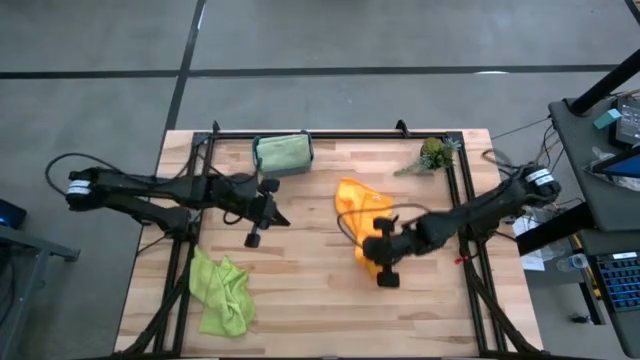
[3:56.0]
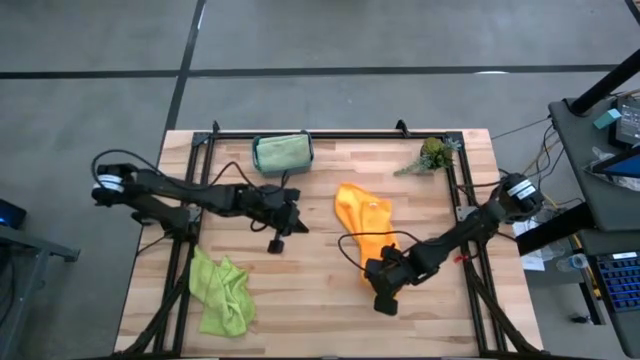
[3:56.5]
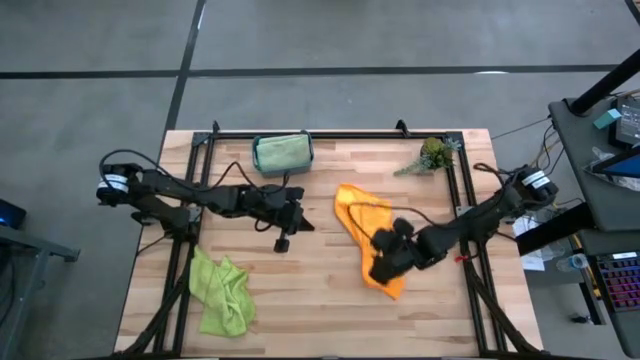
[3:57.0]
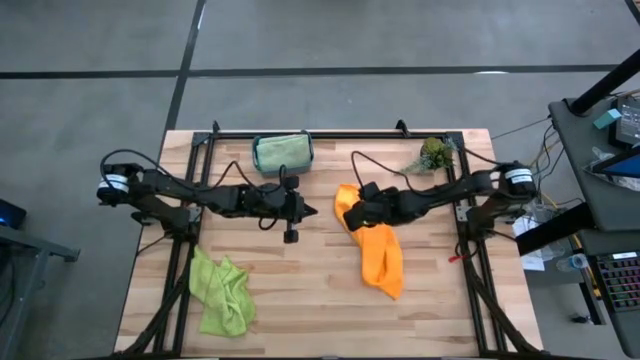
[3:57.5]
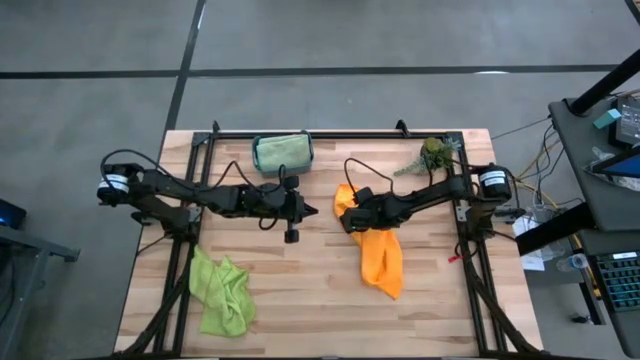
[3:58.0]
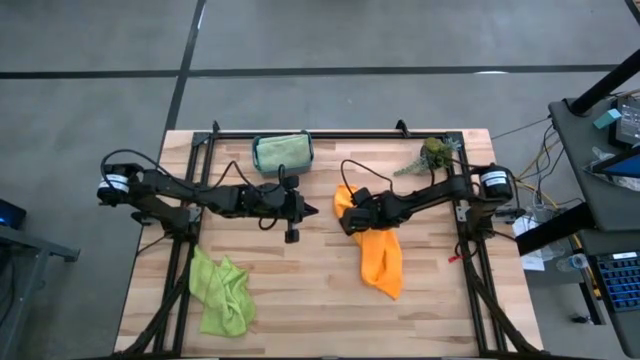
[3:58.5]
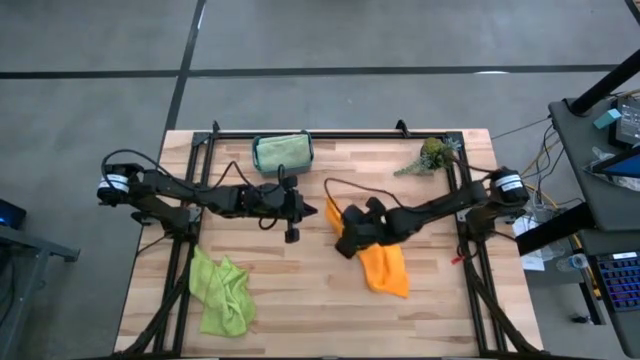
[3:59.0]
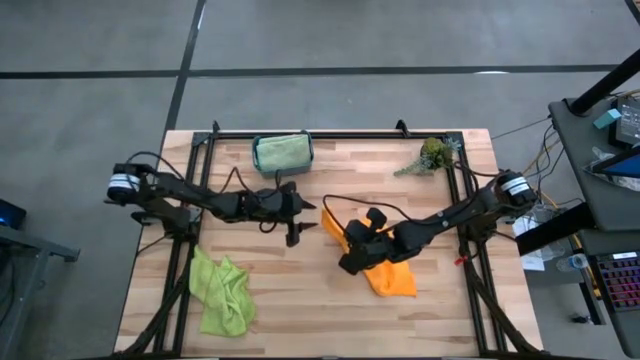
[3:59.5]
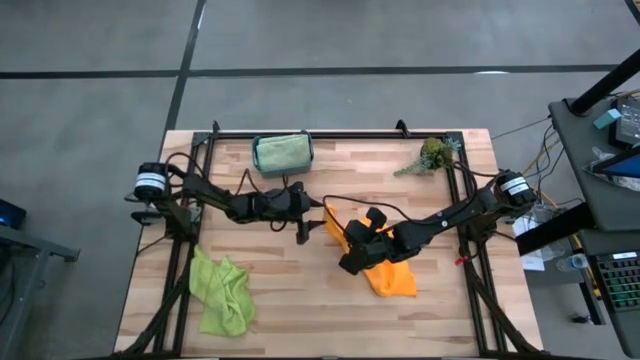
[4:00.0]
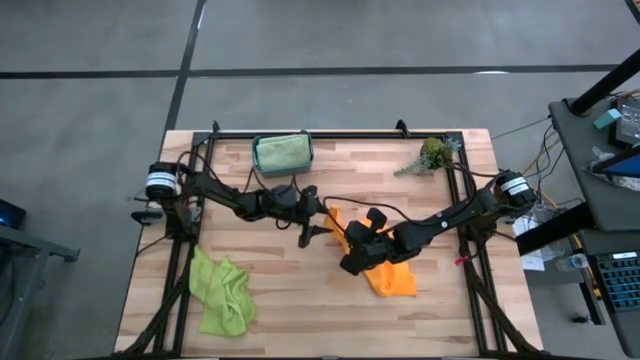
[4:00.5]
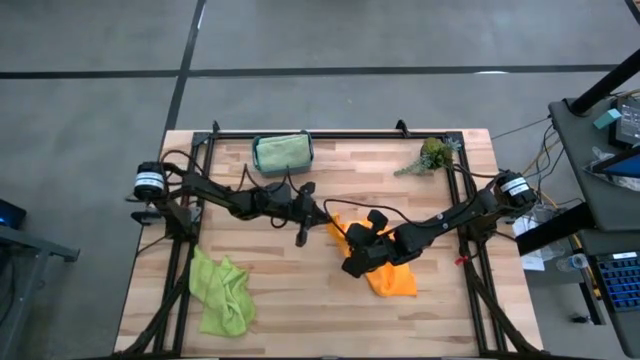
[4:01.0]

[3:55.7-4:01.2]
Task: Fold microfiber towels
Fold the orange microfiber towel

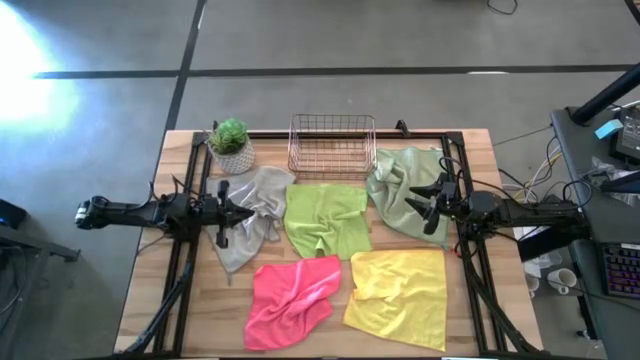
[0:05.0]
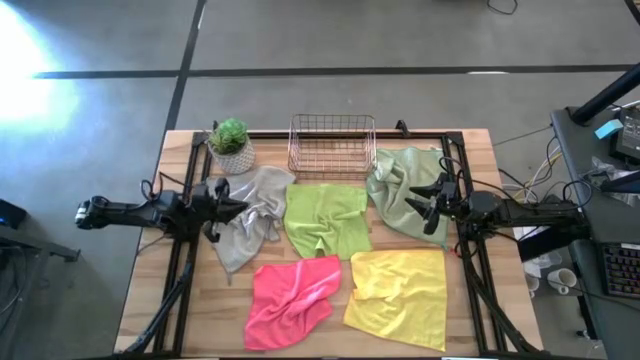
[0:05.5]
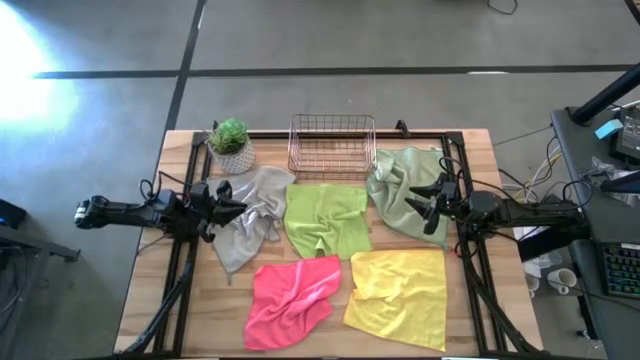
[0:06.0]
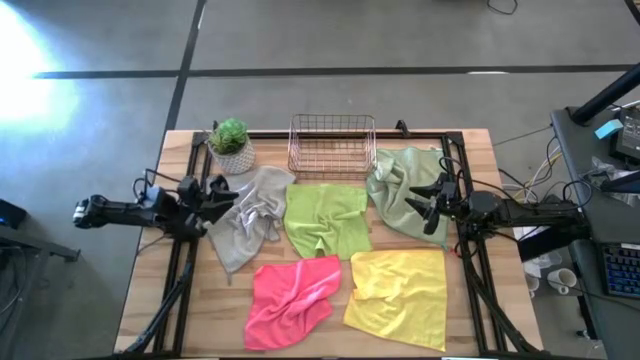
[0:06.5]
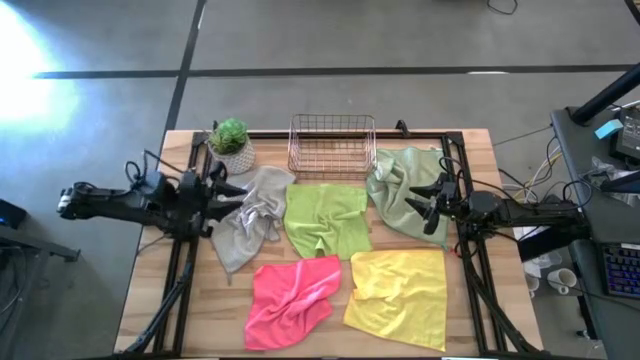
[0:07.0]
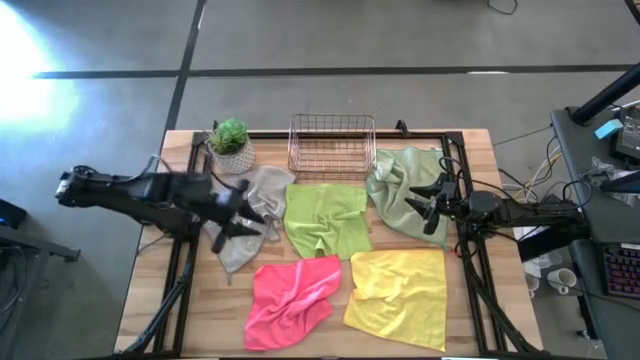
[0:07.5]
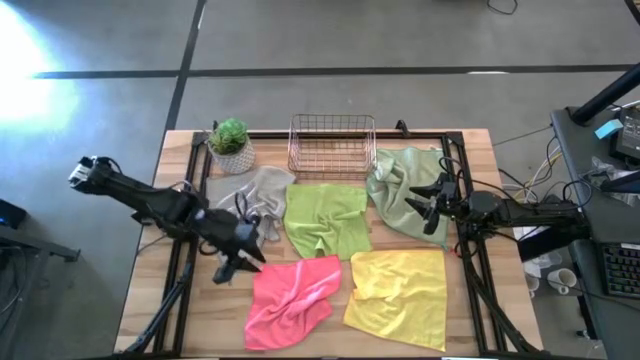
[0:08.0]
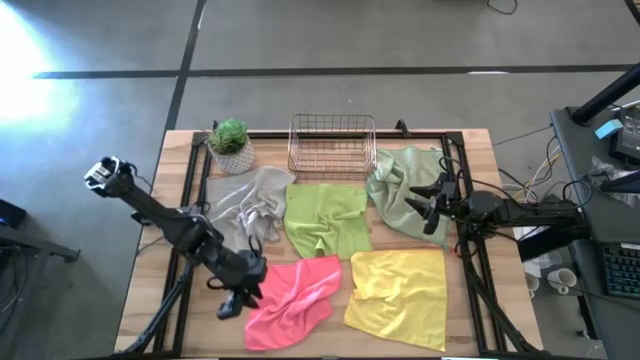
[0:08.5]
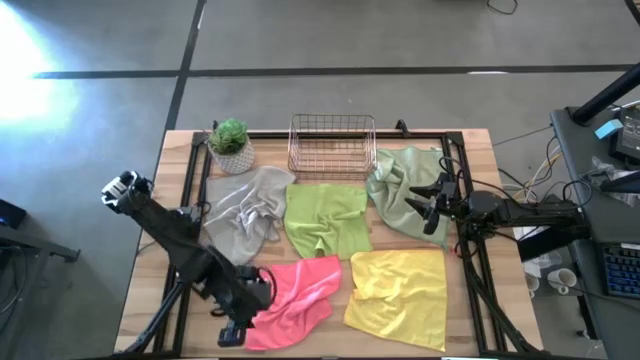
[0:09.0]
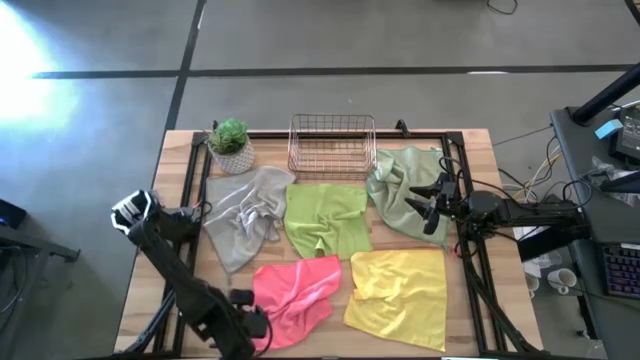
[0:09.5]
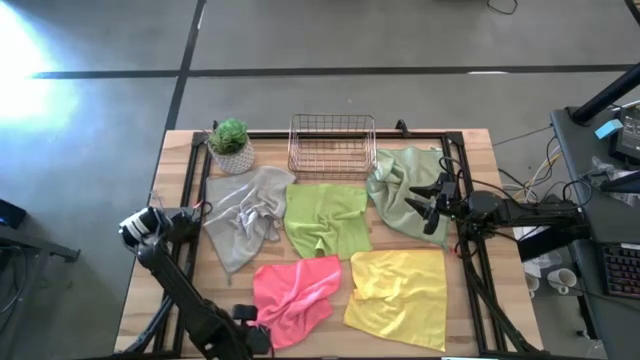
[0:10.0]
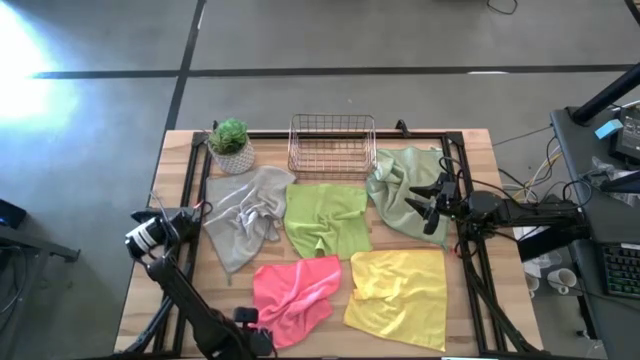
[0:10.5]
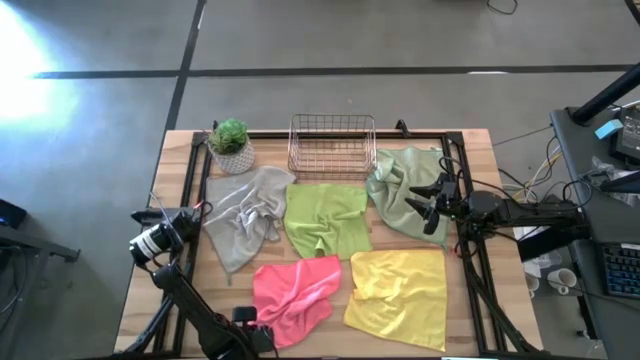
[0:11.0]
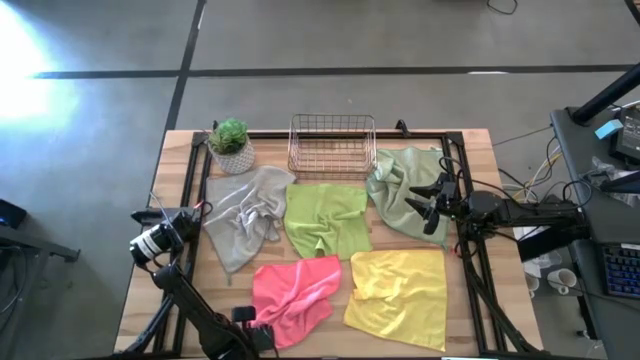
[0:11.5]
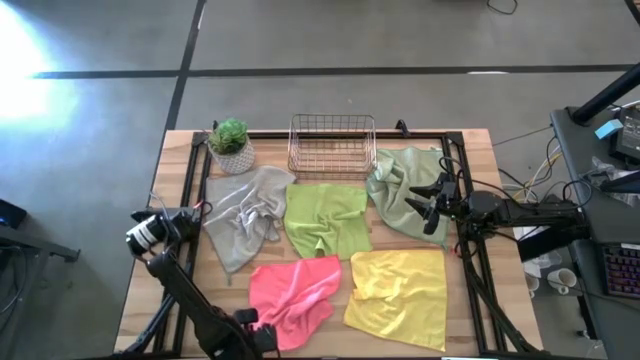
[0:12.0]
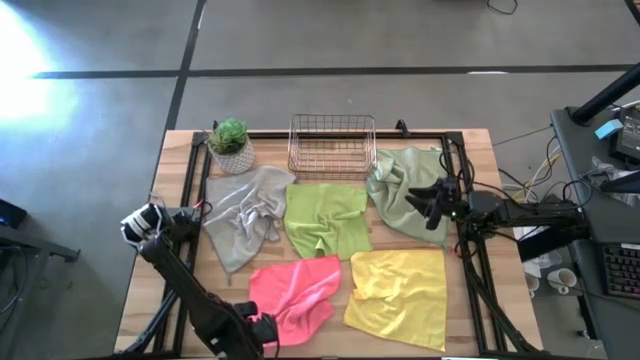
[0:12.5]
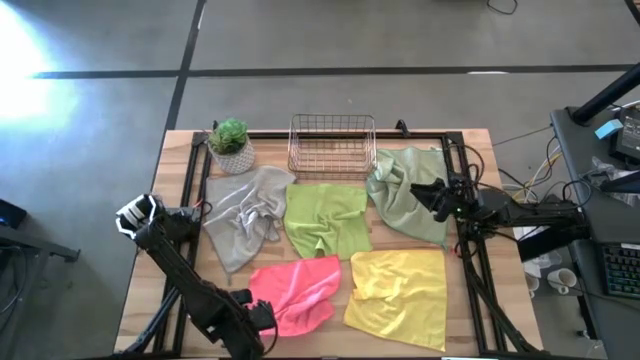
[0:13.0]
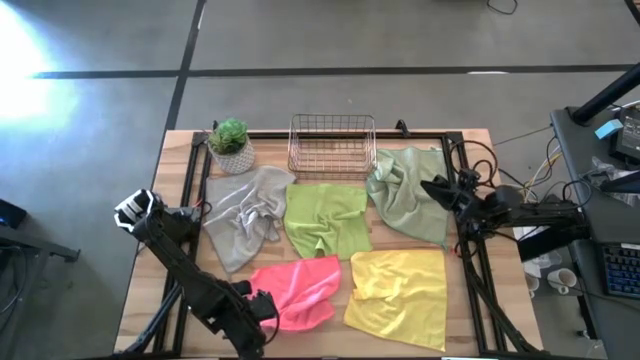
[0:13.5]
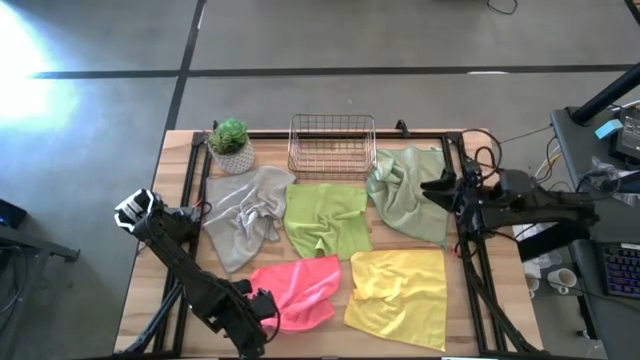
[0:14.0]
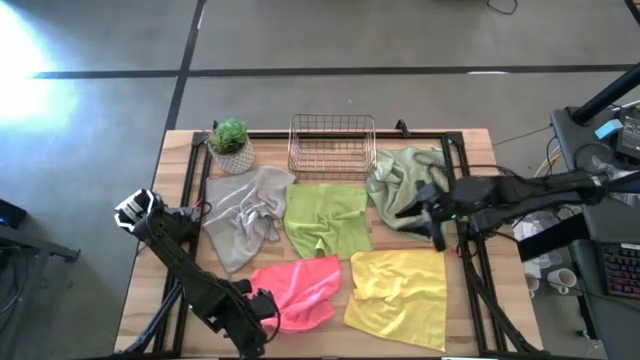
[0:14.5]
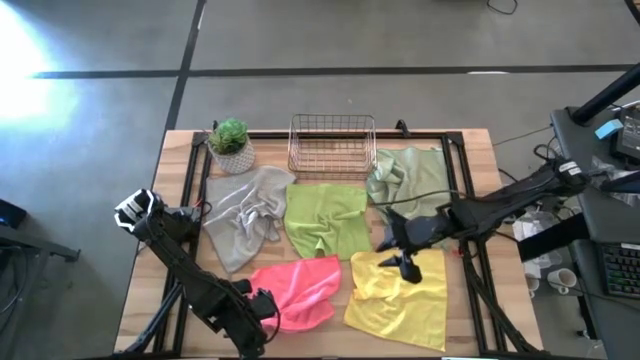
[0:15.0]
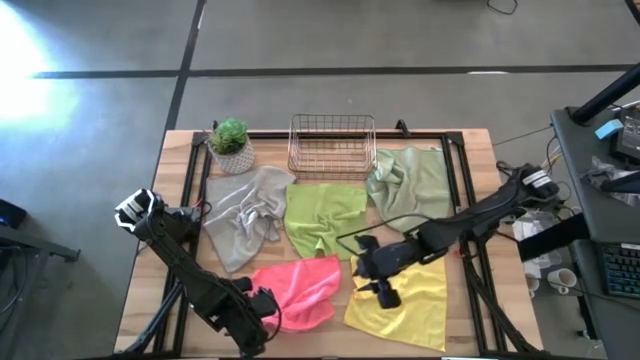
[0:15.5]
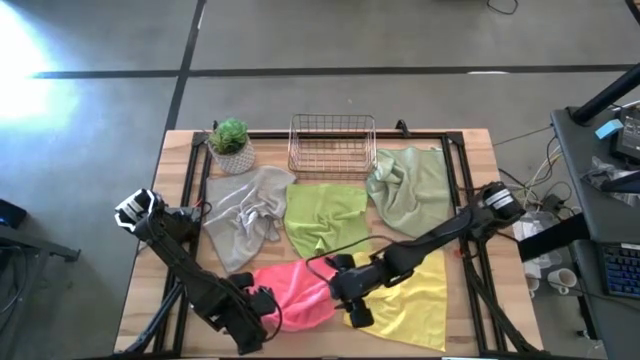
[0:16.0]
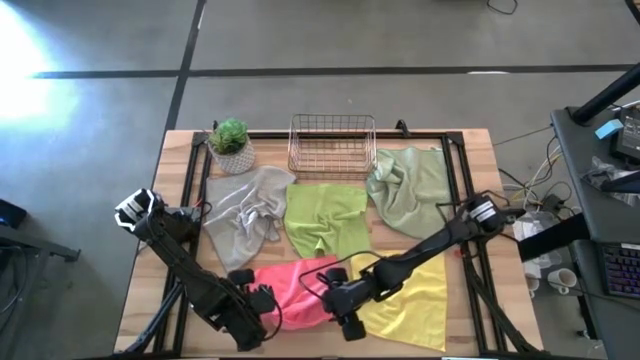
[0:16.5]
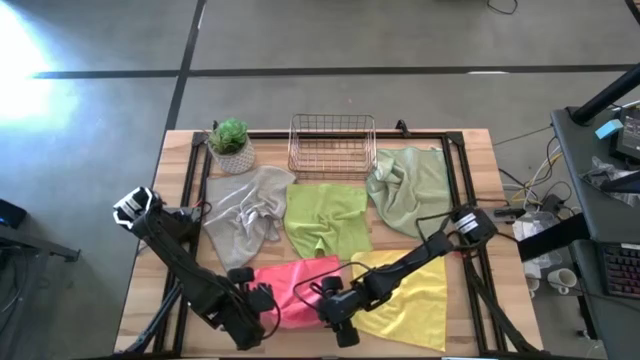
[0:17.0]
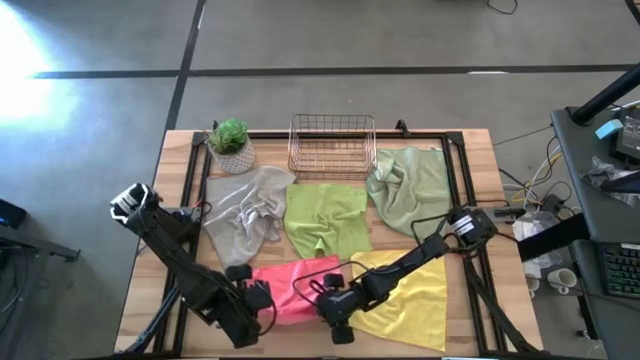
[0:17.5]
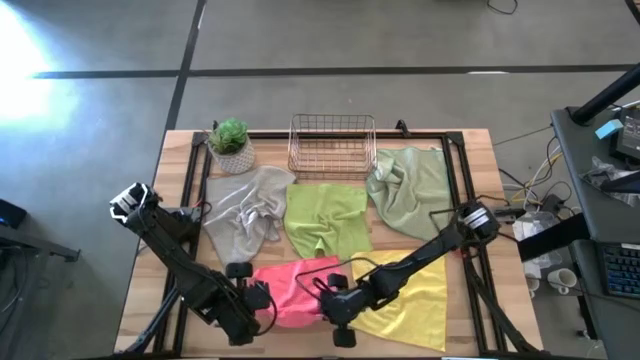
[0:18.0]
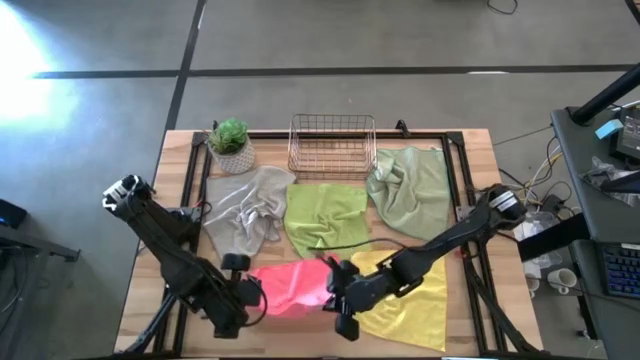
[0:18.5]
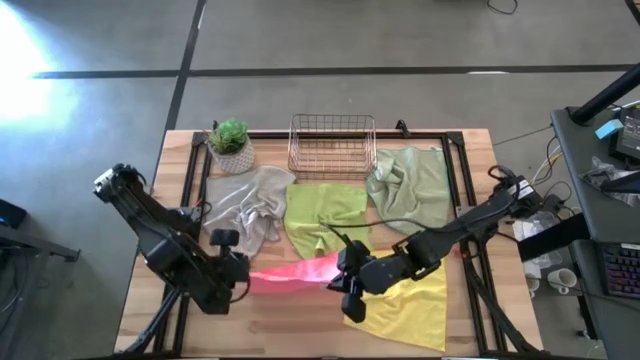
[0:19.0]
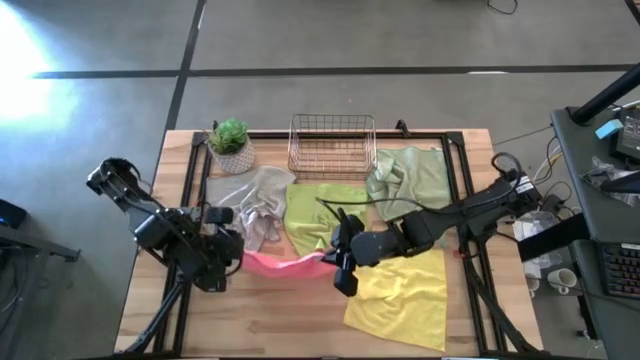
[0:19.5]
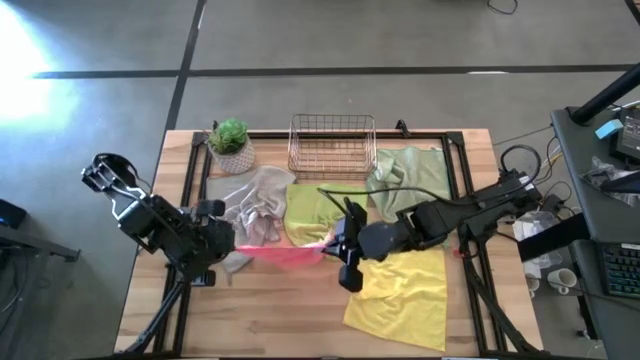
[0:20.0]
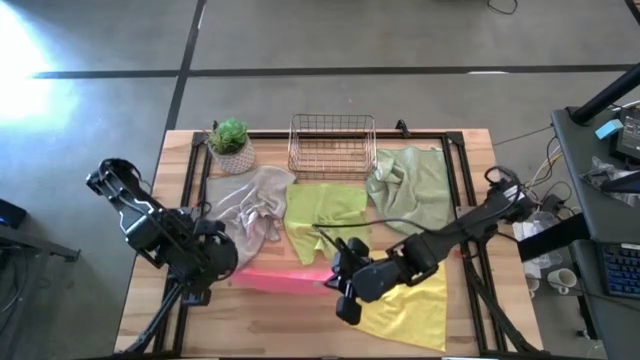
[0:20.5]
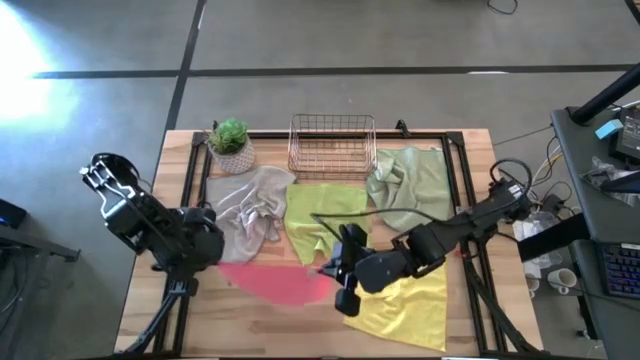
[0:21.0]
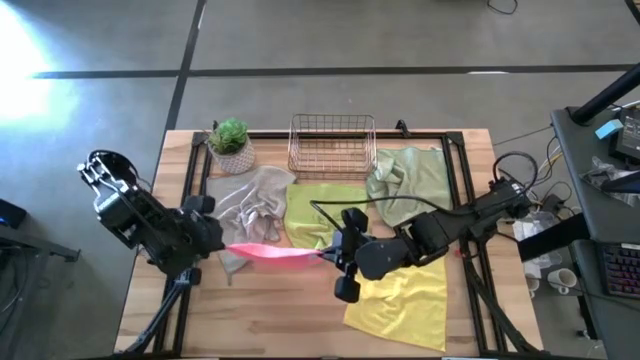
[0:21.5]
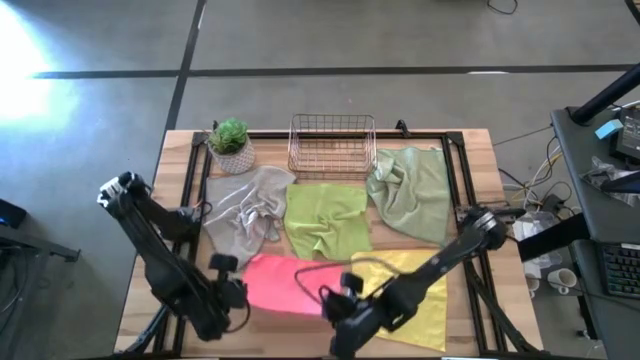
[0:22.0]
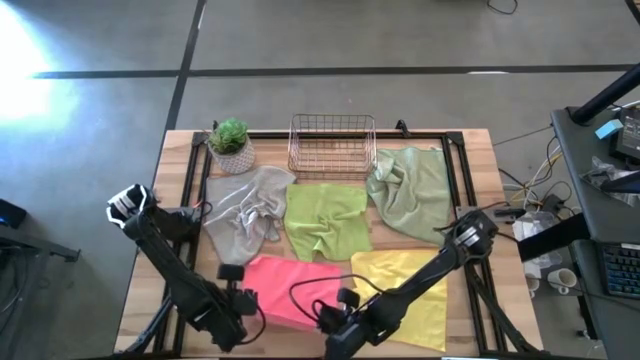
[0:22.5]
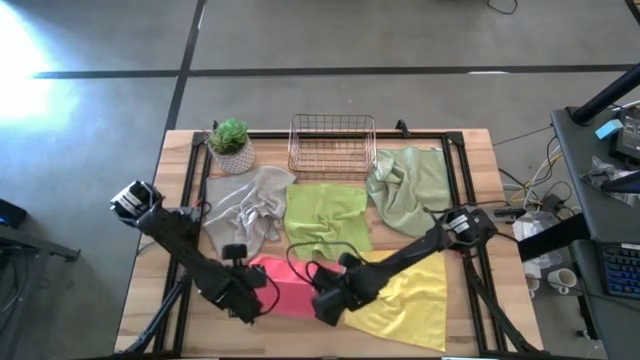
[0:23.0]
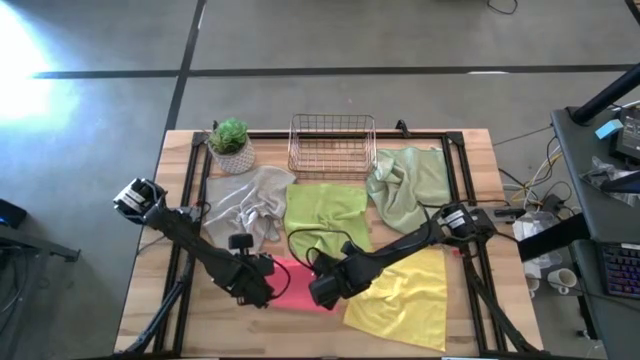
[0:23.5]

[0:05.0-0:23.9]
Task: Fold microfiber towels
Fold the pink towel
